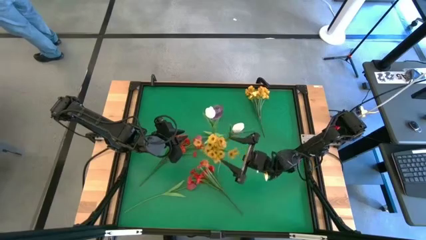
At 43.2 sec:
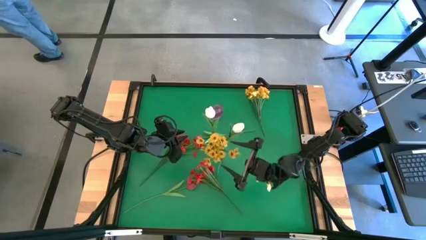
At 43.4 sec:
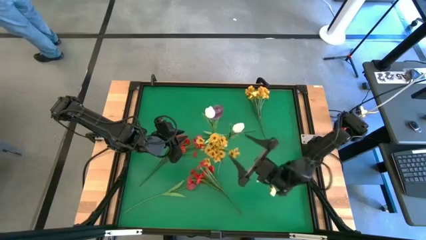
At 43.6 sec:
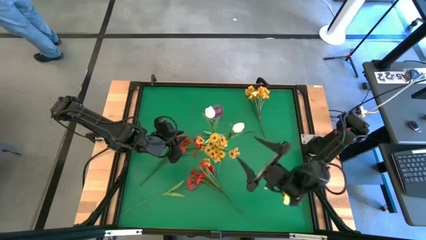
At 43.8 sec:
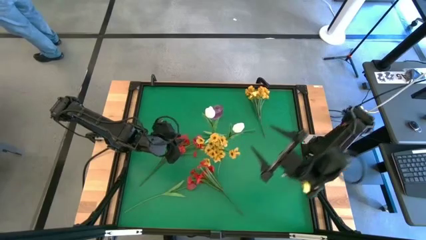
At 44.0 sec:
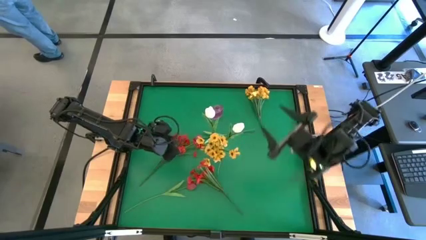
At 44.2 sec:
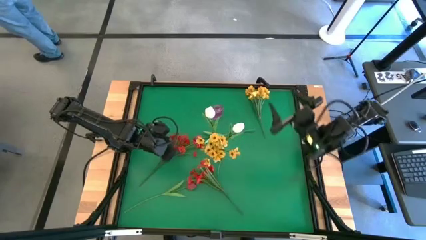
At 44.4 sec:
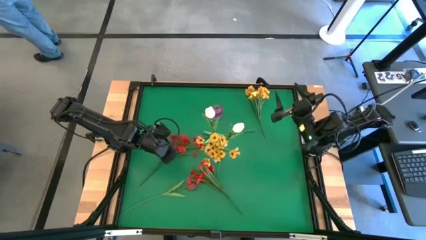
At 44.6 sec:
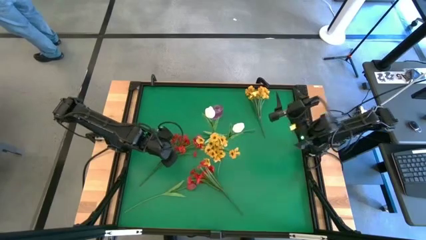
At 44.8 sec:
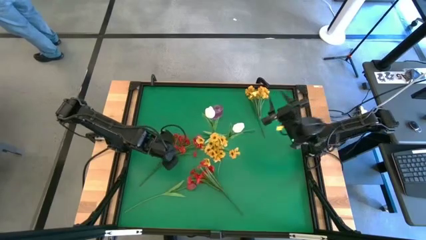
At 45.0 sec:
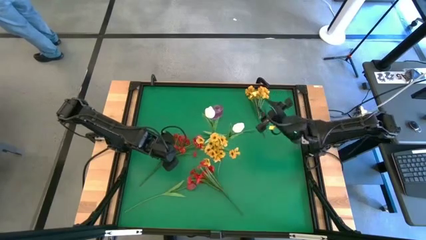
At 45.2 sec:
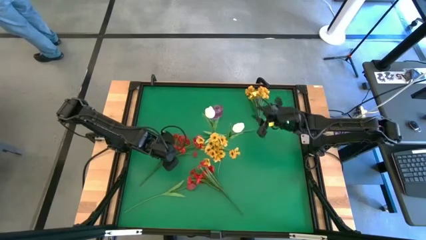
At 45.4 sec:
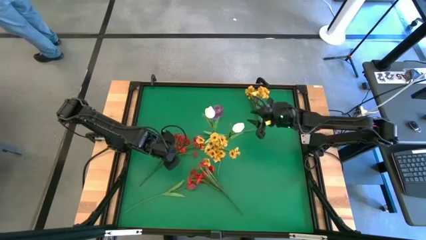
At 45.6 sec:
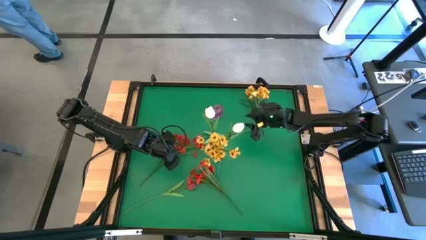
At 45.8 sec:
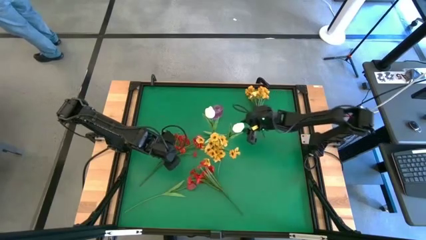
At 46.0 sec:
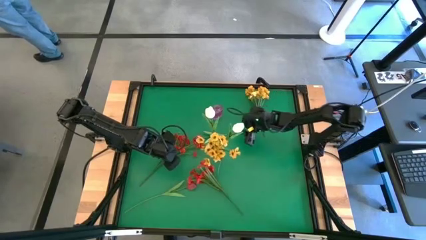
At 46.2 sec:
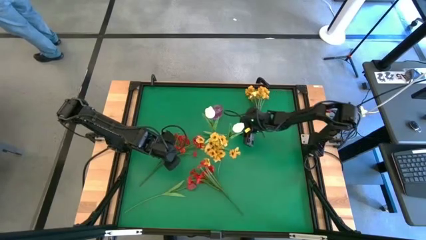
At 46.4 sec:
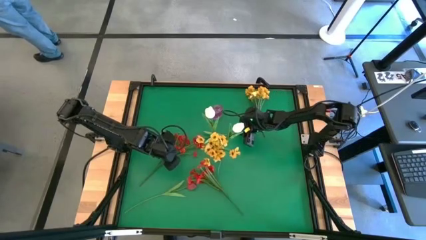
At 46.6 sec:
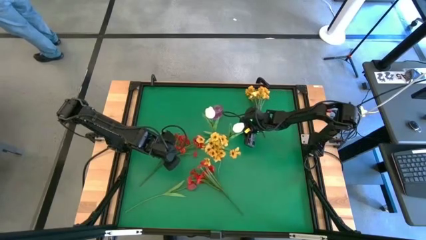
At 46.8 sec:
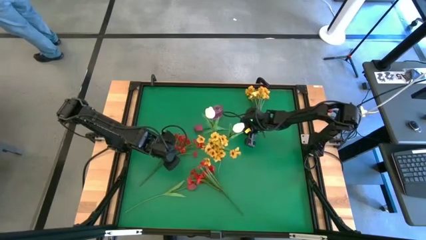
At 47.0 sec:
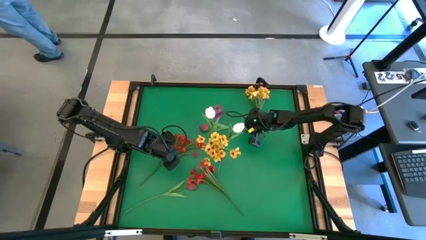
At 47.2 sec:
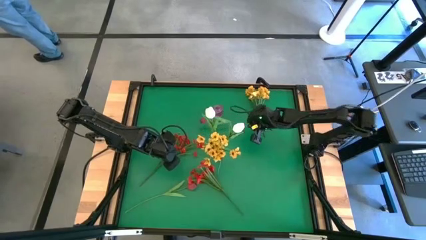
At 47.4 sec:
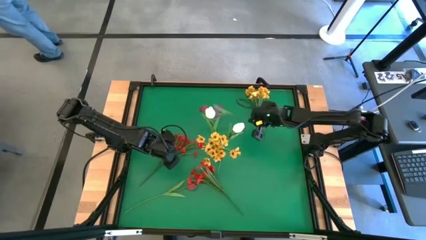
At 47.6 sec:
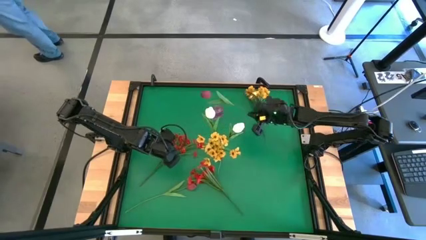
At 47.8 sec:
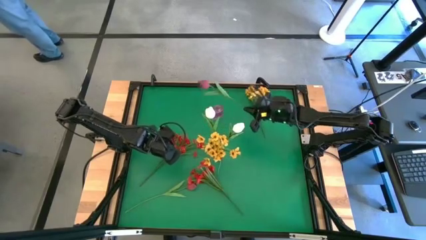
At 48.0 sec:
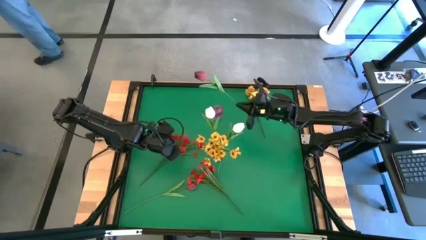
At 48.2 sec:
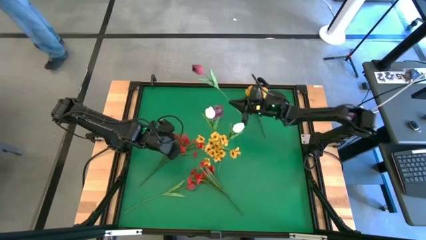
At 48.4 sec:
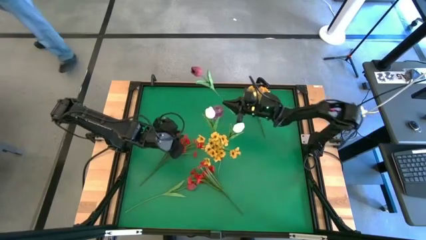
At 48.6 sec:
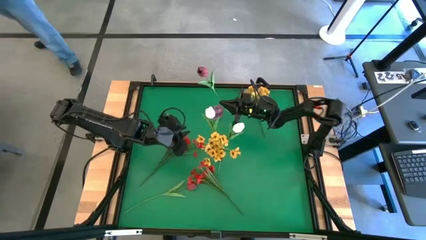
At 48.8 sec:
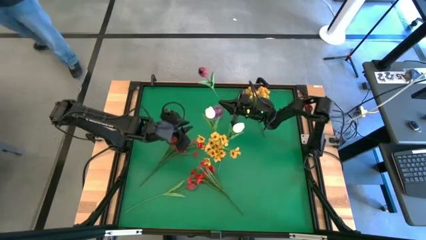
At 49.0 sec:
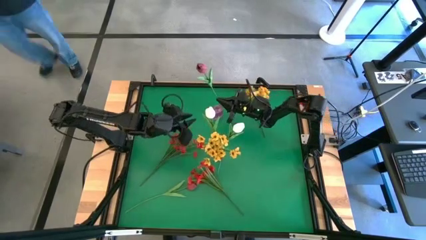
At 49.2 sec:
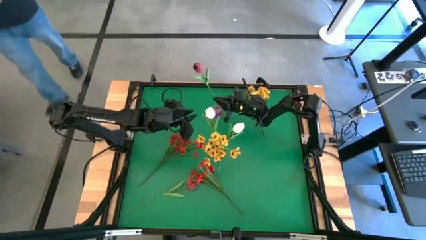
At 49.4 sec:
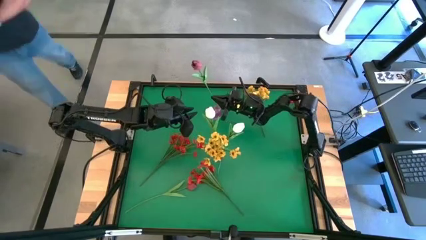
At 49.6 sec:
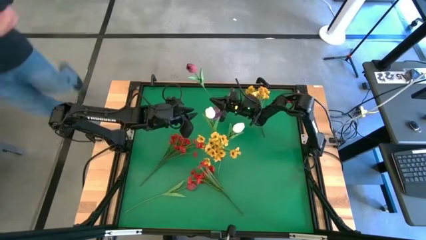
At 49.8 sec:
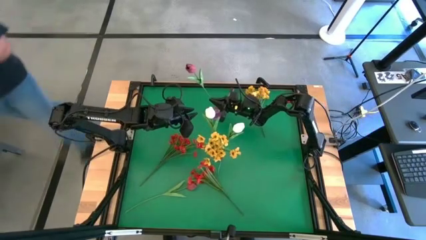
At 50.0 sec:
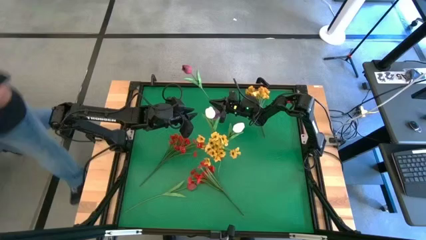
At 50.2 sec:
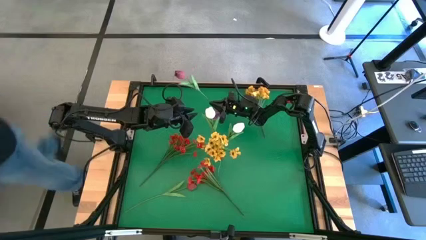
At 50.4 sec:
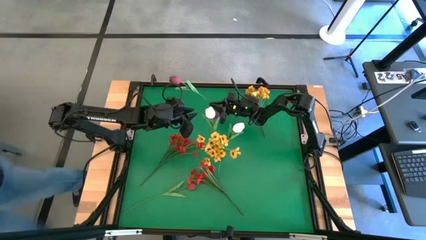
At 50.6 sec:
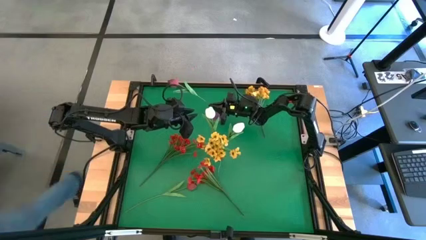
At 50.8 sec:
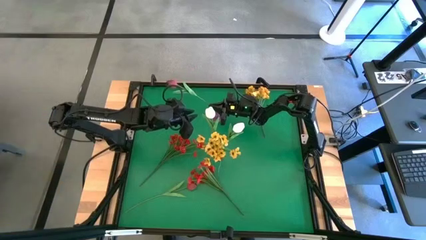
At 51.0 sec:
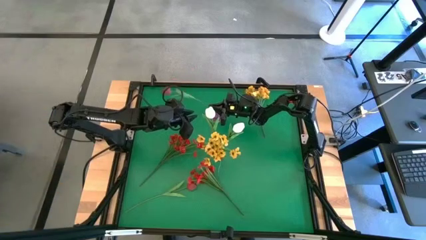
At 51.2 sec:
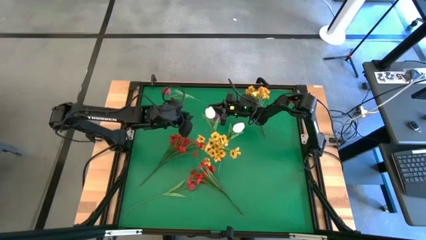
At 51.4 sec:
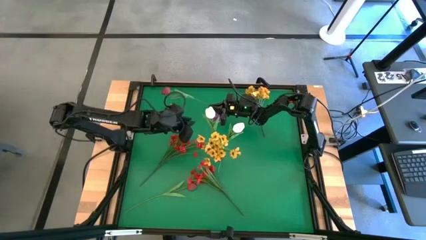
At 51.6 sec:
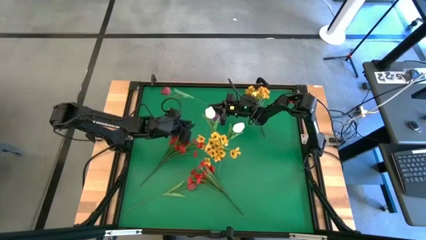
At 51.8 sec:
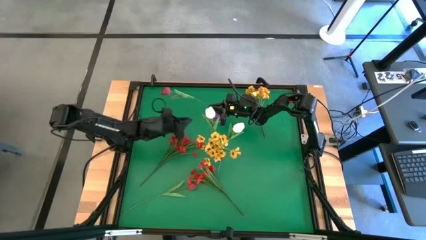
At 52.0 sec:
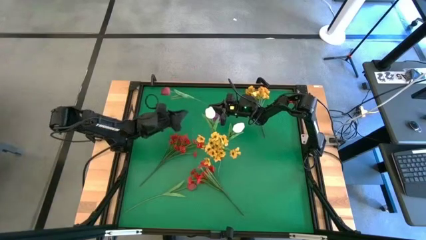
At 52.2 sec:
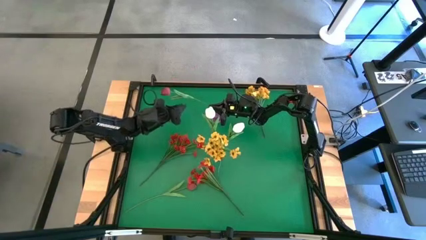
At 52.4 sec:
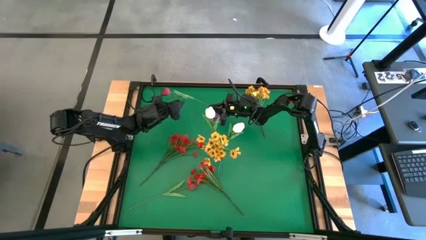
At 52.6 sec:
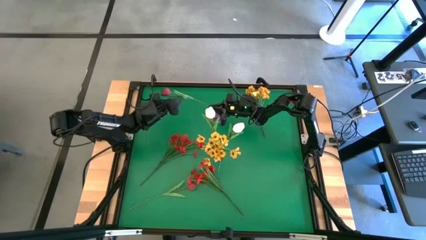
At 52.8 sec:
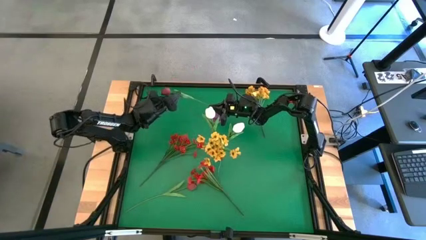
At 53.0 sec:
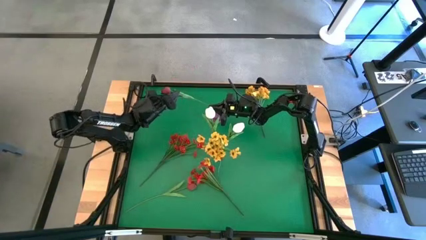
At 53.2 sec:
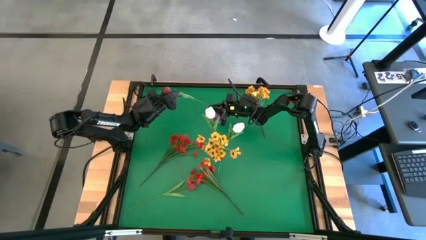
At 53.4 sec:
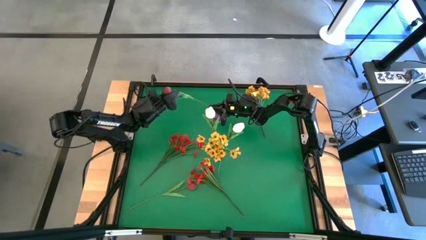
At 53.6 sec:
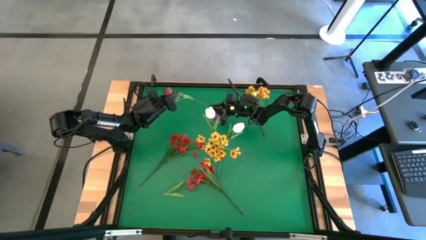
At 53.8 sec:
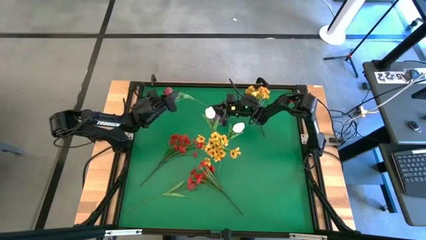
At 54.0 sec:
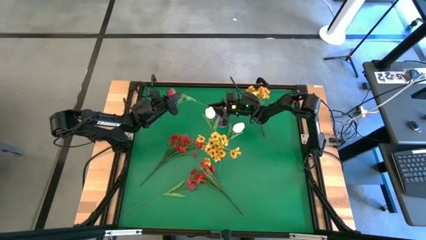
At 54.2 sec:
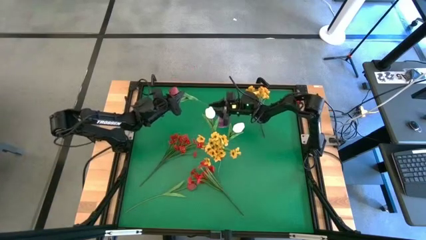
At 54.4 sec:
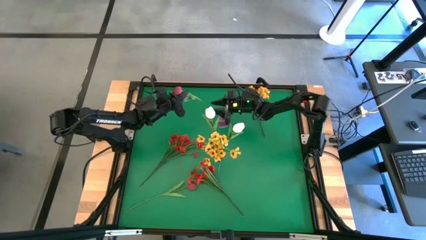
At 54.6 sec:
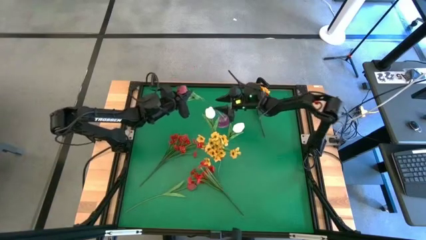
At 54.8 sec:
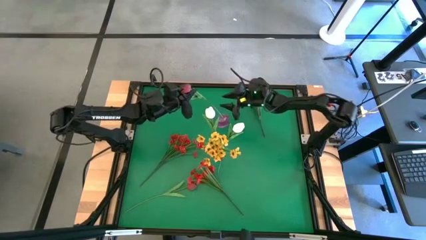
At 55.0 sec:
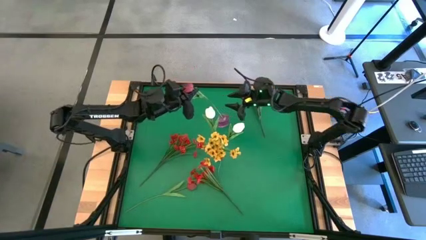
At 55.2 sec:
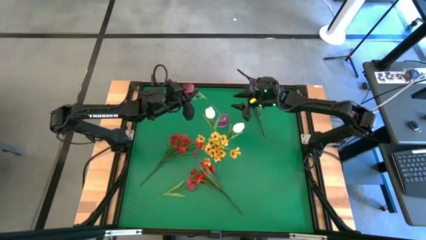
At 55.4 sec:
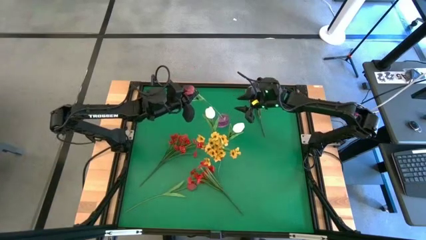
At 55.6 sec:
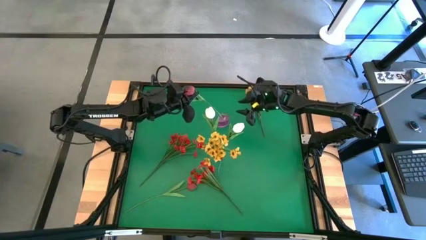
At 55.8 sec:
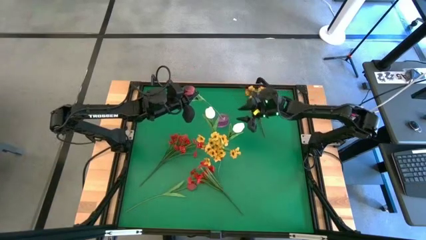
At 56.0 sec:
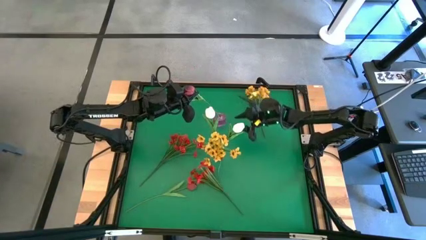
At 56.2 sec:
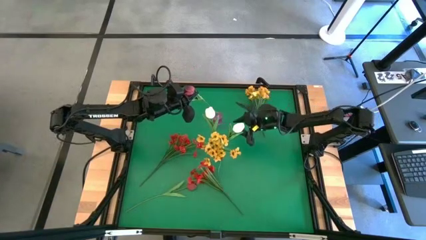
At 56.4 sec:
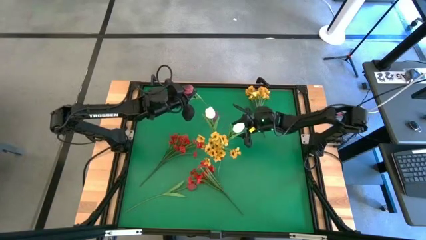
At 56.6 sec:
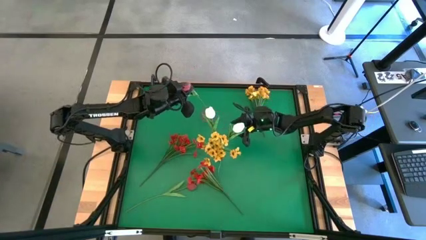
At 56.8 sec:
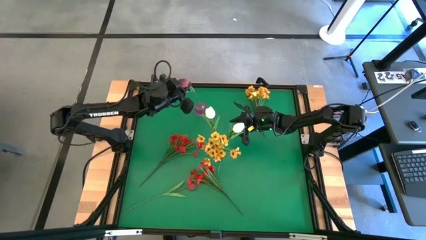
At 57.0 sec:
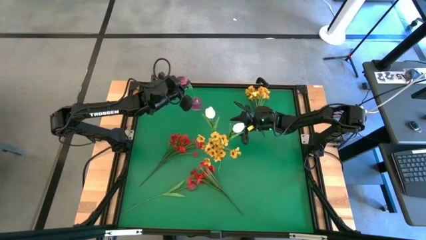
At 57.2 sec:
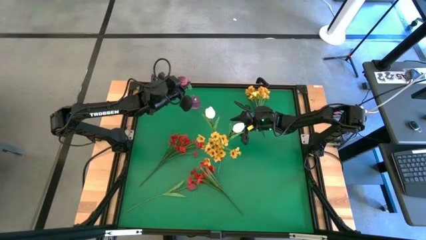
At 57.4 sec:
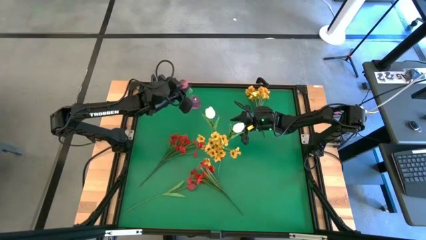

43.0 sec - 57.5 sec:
Task: Sort flowers into vase by color
Put the top red tulip into the pink vase
